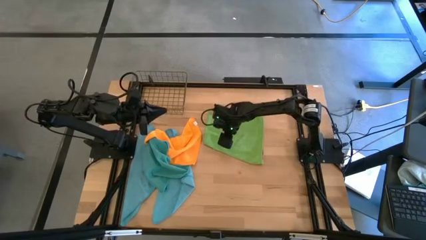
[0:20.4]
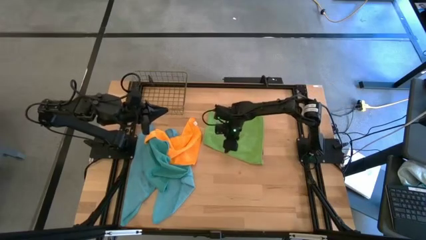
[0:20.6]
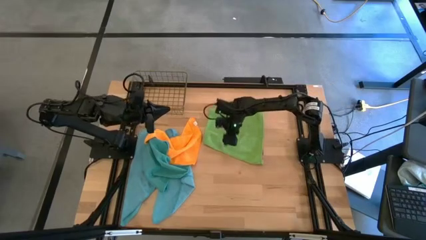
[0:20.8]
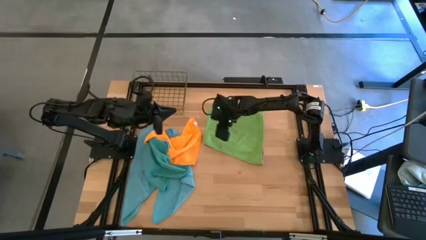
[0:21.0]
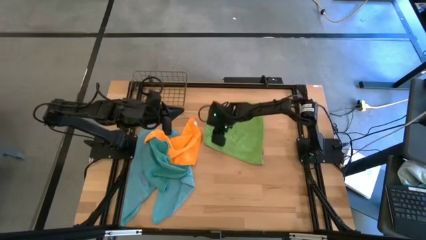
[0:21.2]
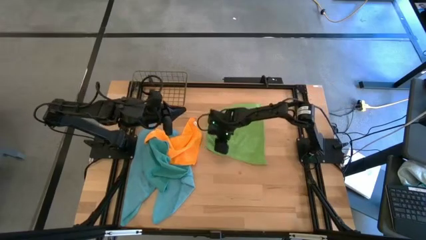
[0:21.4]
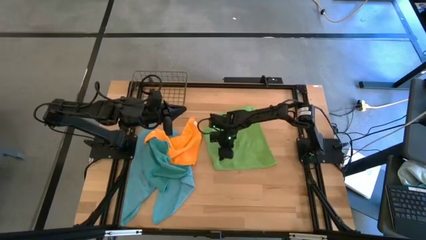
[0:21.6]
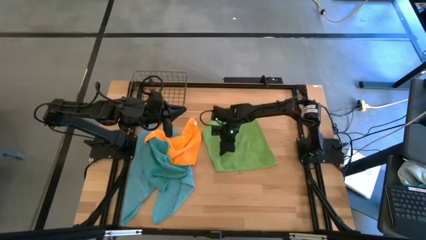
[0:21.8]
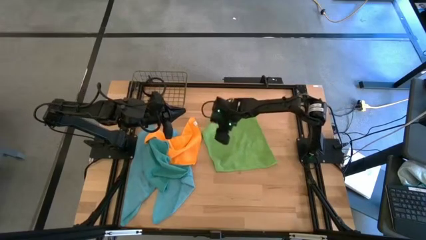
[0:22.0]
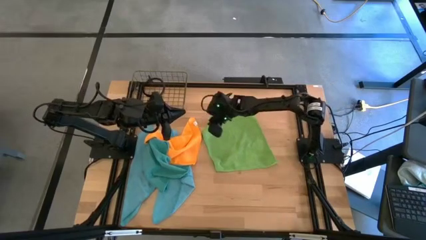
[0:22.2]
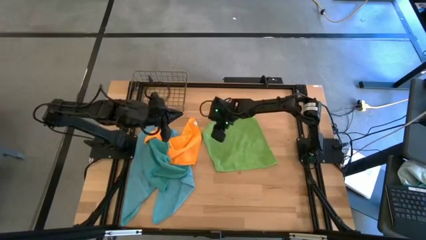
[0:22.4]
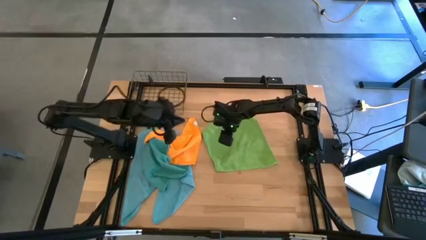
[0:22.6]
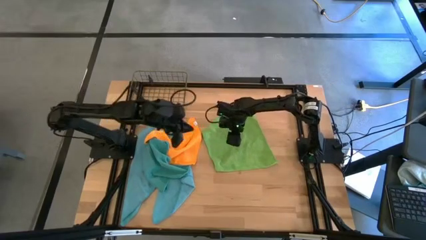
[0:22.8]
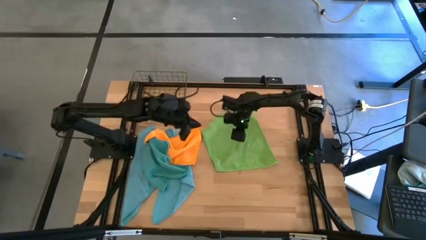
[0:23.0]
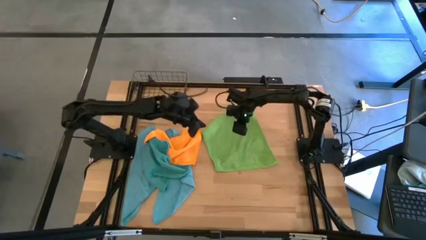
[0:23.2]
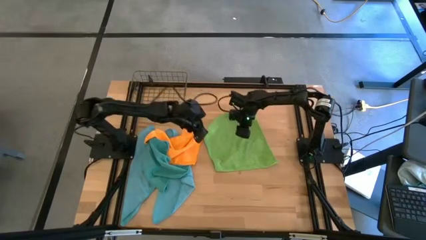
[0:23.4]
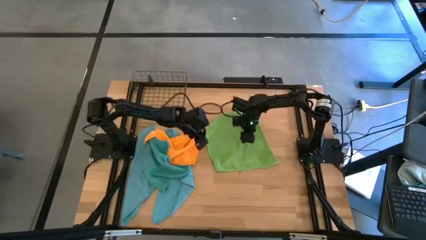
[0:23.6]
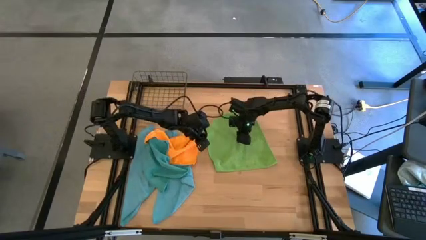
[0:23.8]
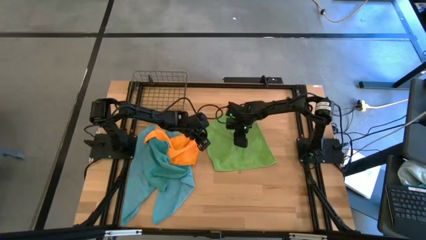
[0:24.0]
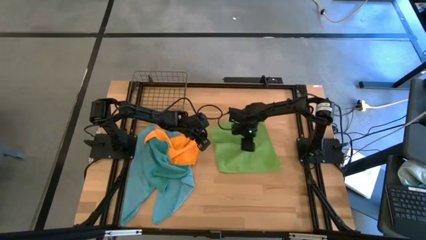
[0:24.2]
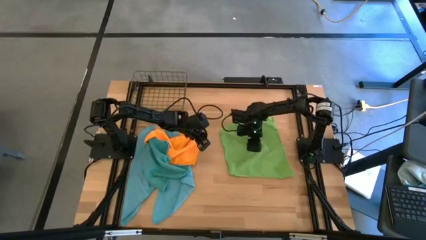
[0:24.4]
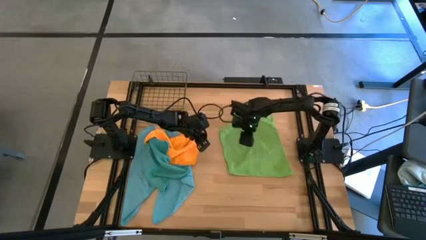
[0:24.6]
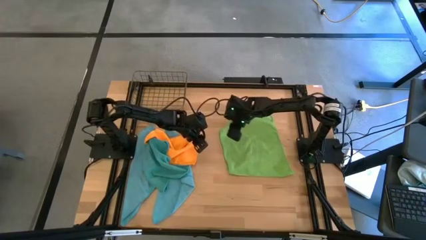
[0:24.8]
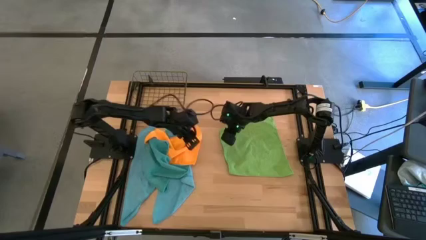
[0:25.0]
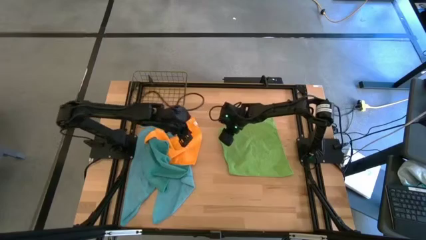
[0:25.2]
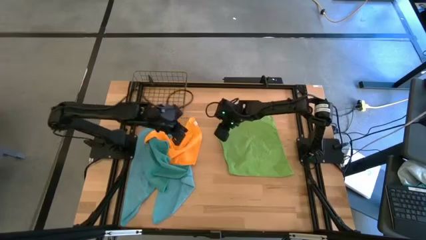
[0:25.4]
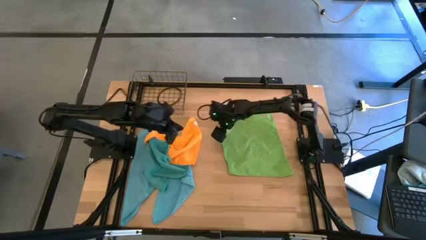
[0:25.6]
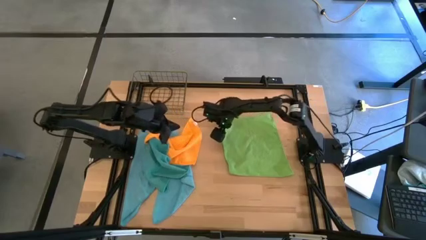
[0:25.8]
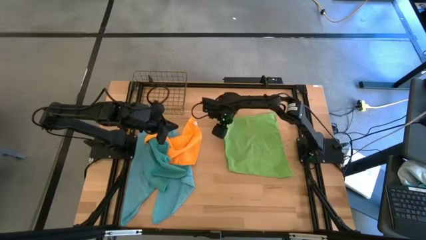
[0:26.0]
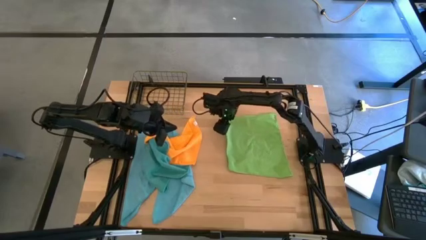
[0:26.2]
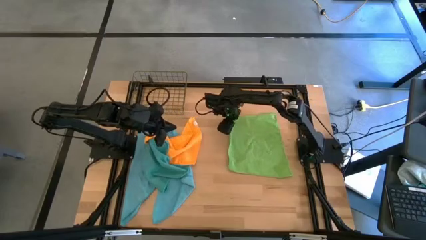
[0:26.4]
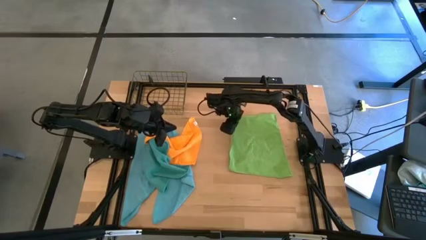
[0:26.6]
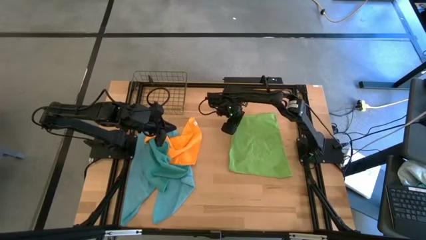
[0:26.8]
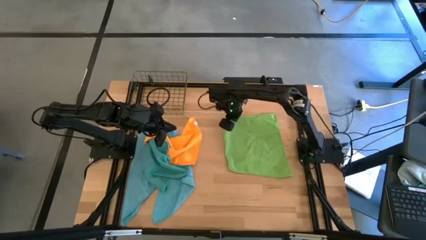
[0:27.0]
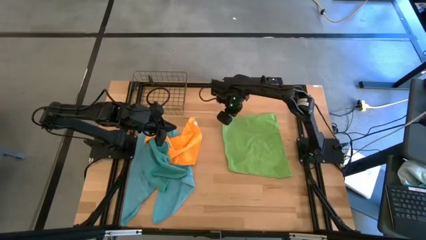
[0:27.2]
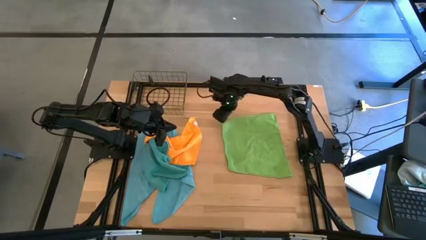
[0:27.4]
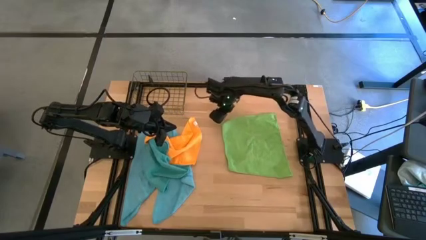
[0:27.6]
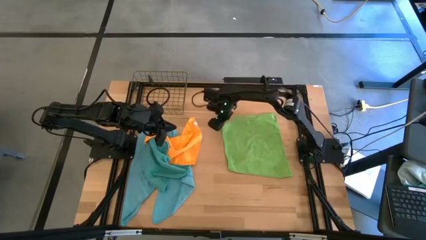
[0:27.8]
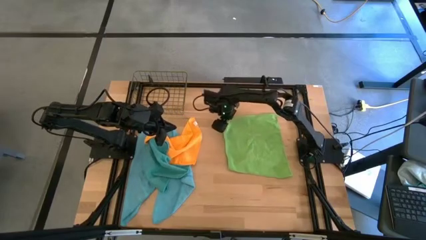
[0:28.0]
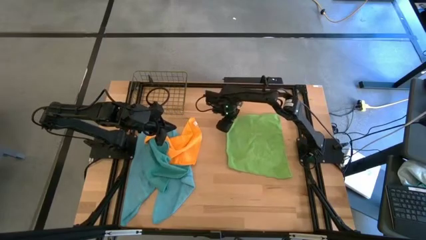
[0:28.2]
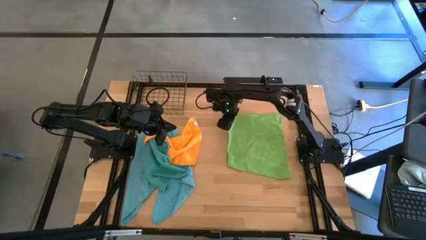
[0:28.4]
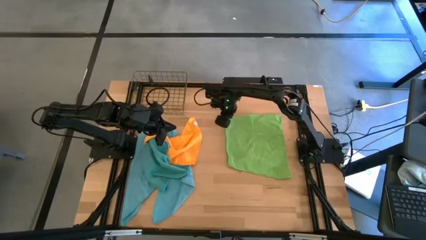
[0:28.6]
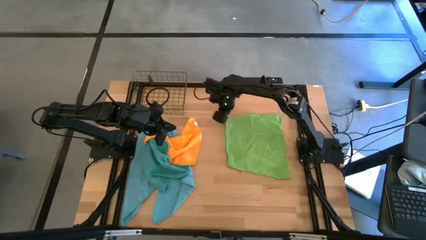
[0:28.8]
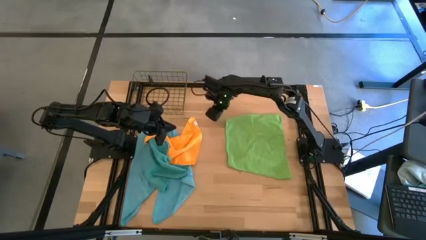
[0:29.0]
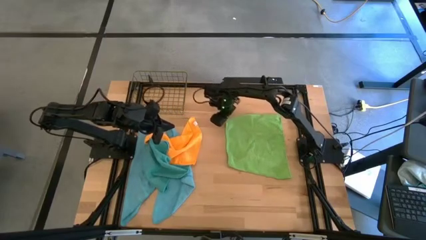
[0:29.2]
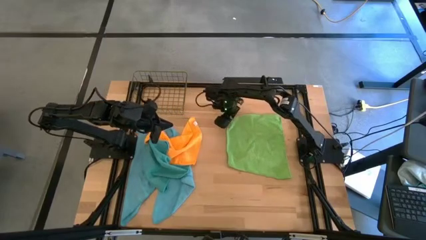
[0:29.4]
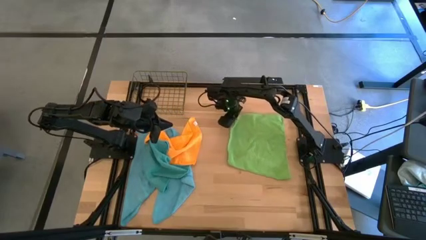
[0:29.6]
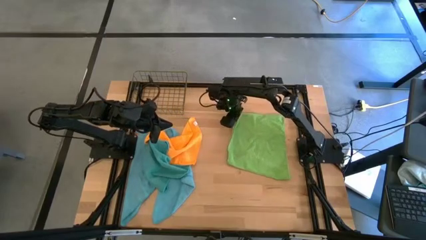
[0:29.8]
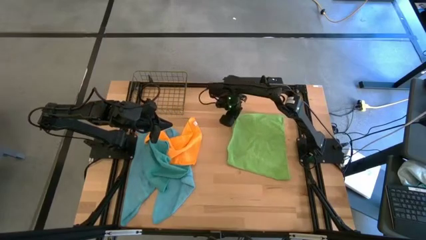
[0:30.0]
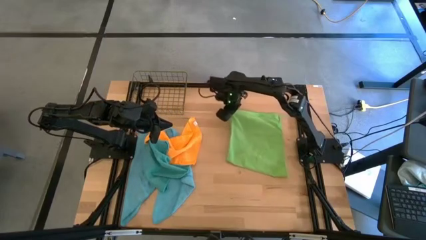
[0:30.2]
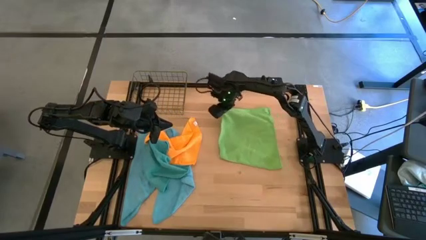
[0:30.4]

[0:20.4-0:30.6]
Task: Fold microfiber towels
Fold the green microfiber cloth

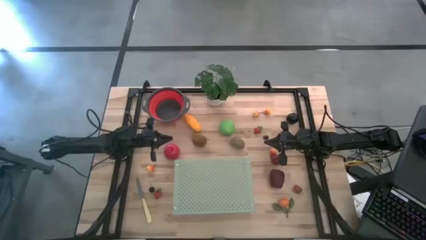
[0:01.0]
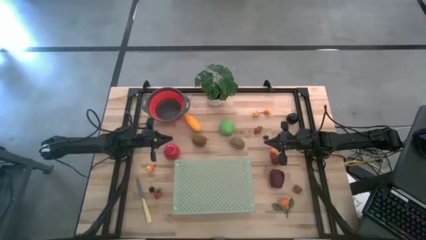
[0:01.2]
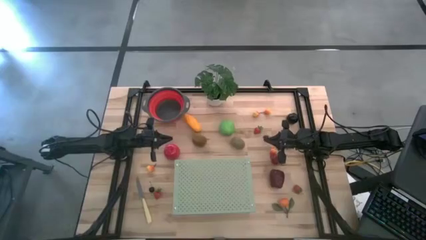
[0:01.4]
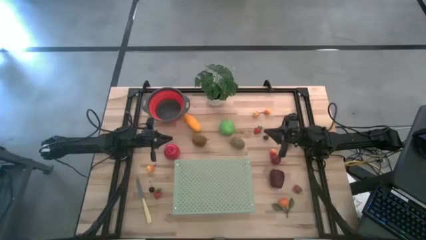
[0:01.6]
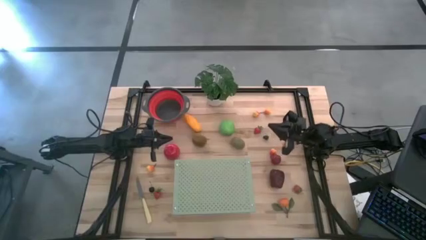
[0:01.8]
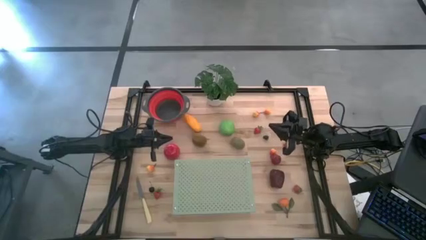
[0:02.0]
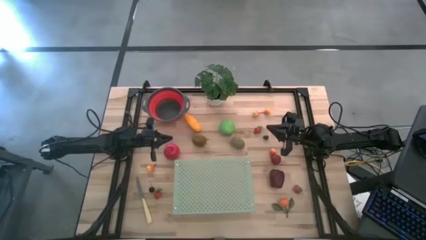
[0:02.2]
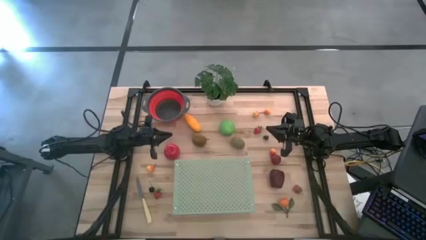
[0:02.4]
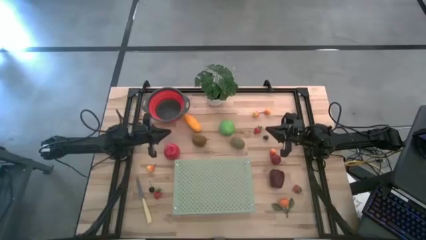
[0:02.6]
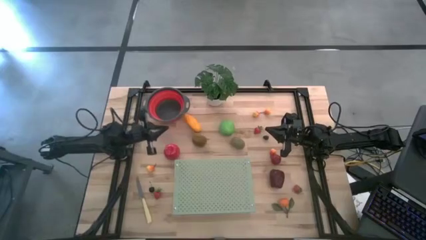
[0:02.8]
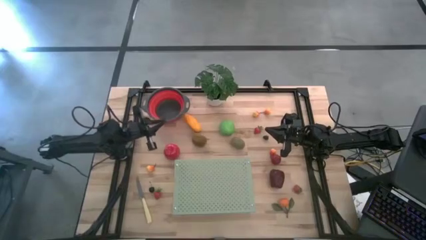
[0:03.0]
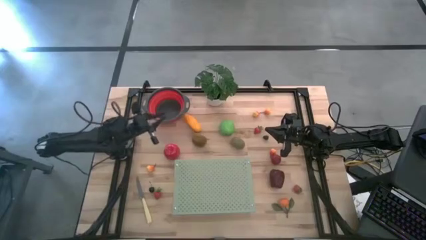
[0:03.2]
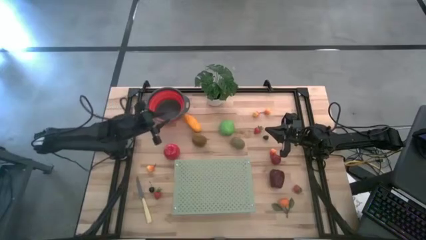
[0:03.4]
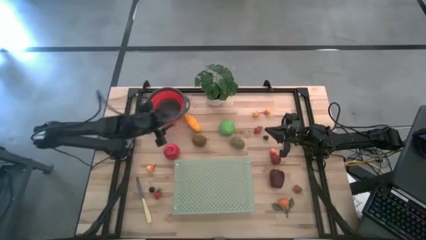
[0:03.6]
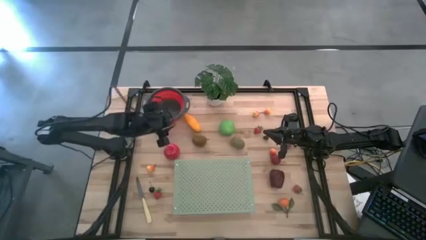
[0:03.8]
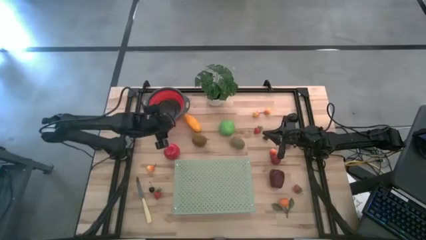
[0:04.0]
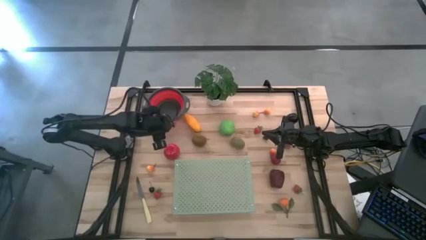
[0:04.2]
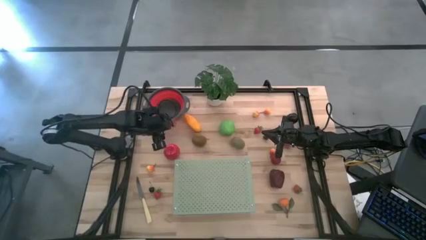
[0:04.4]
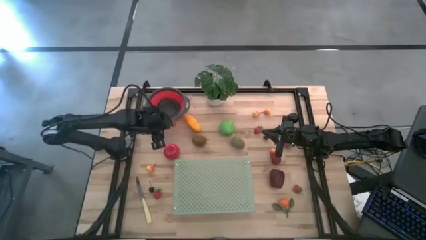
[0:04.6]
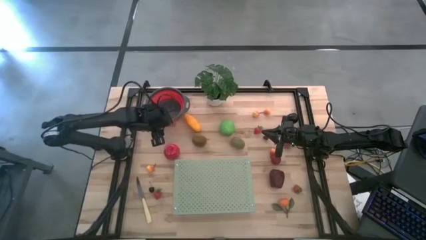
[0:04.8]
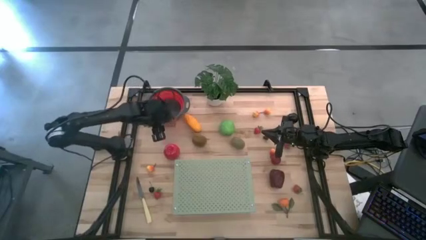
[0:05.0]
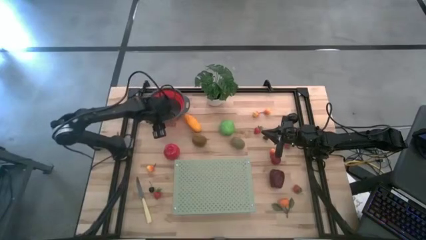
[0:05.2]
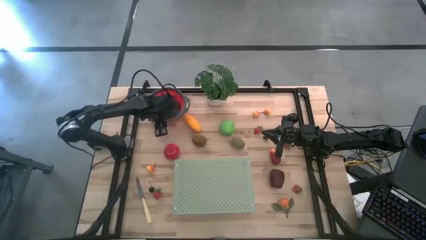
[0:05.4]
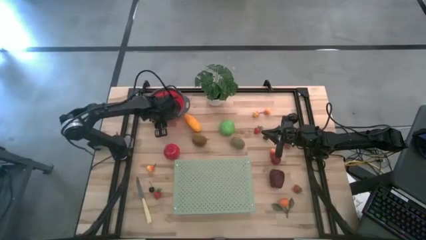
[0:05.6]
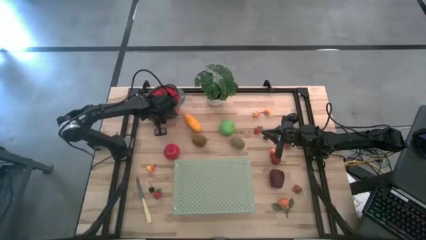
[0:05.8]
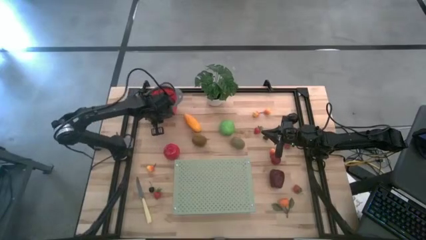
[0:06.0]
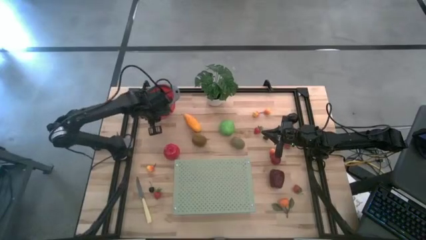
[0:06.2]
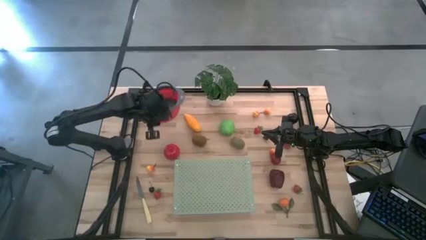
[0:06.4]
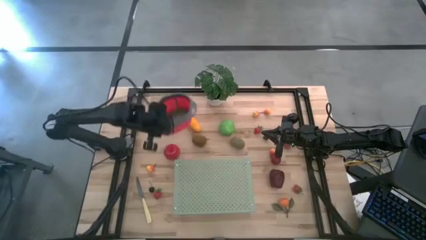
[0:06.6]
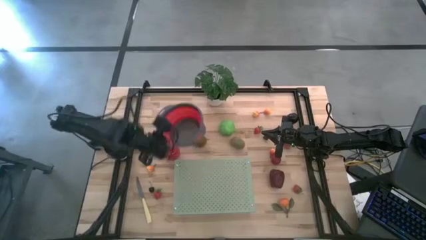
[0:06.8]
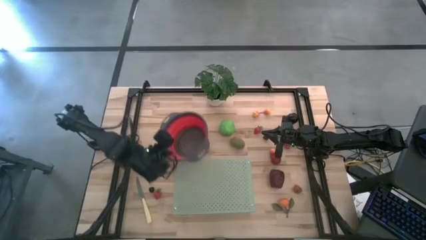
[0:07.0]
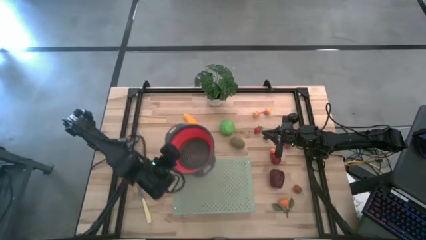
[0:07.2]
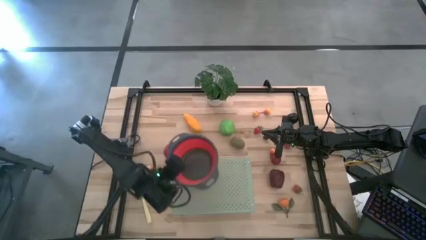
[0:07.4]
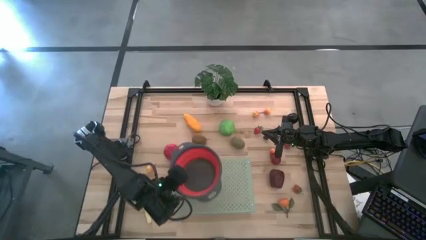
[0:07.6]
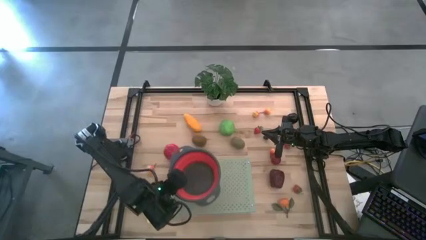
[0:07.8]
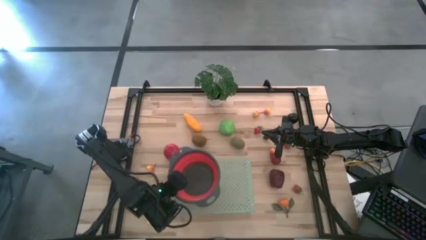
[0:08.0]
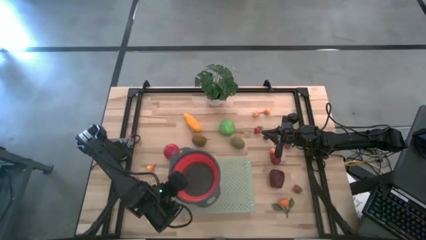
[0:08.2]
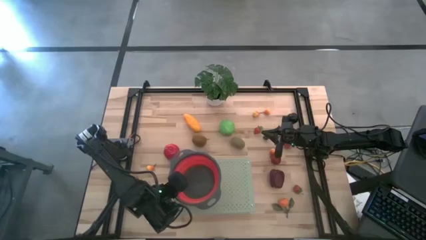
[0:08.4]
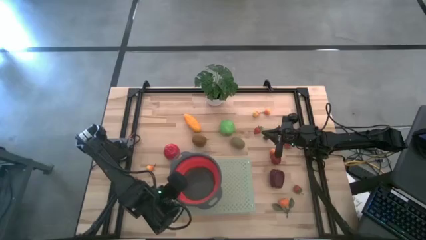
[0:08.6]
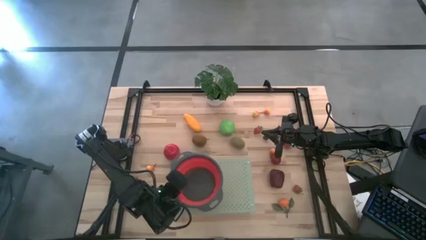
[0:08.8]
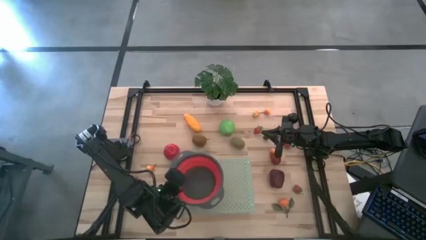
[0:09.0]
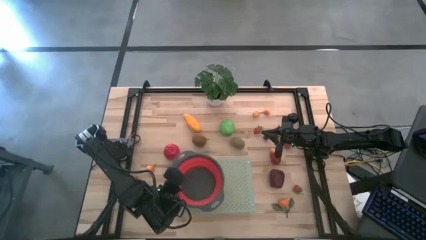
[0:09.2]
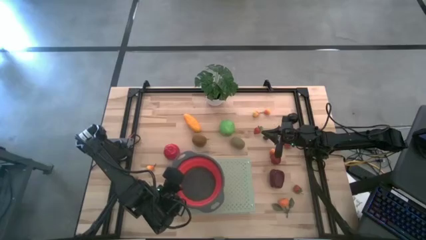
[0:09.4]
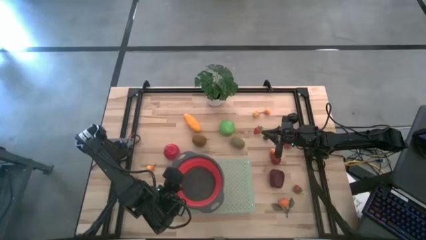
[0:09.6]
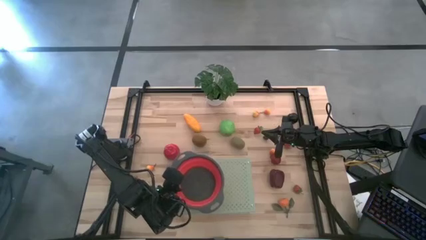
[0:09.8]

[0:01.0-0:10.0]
Task: Pick & Place Fruit
Put the red strainer on the shelf
